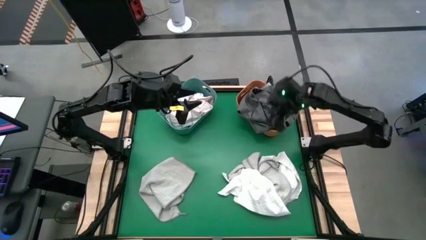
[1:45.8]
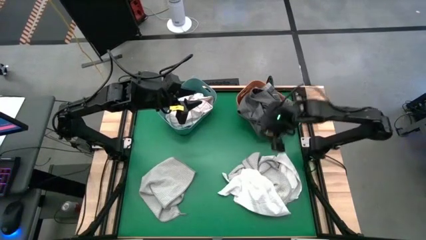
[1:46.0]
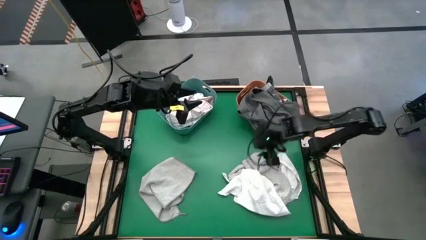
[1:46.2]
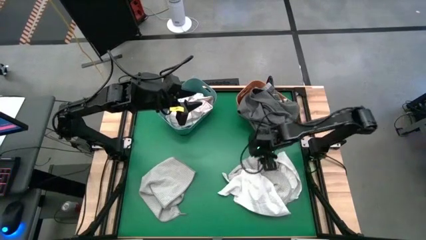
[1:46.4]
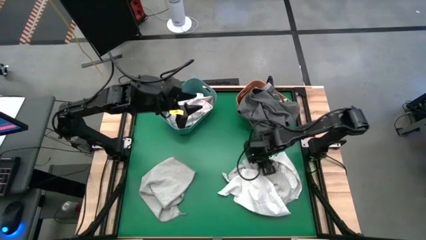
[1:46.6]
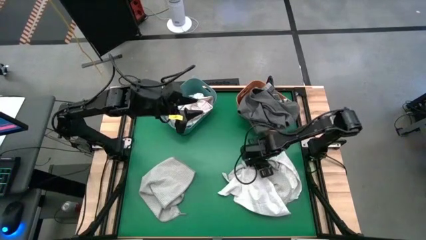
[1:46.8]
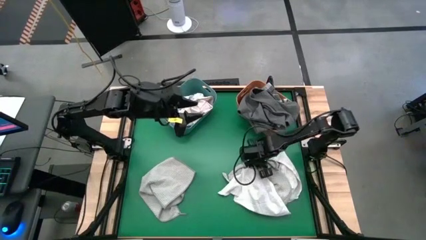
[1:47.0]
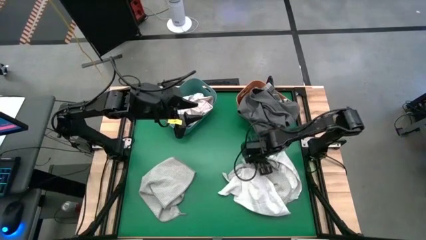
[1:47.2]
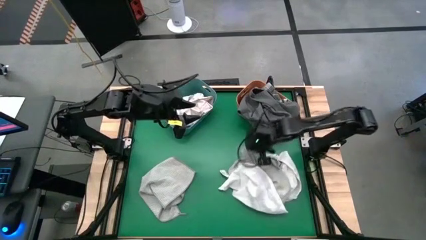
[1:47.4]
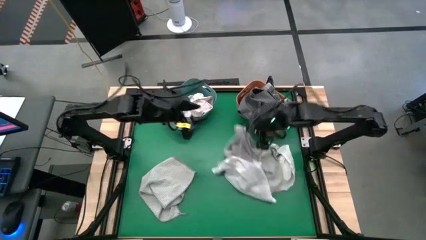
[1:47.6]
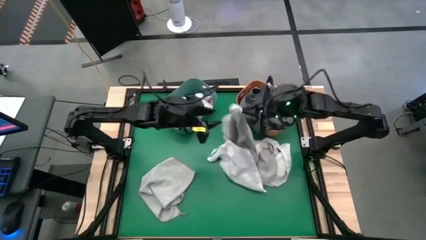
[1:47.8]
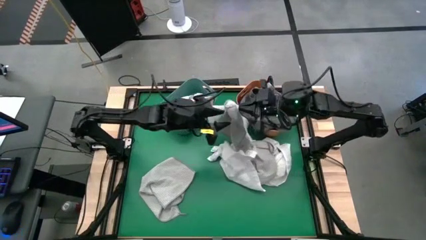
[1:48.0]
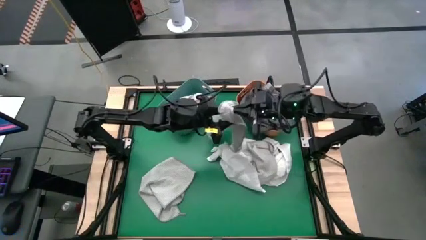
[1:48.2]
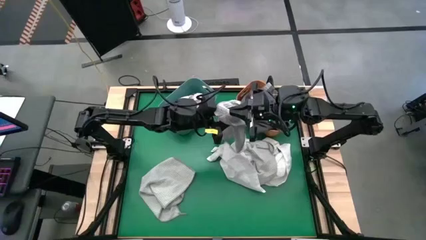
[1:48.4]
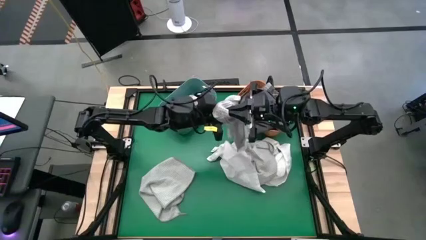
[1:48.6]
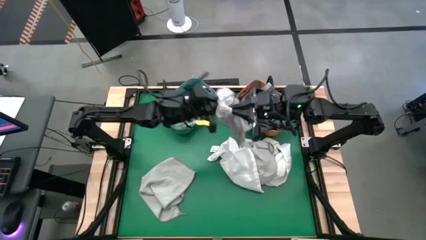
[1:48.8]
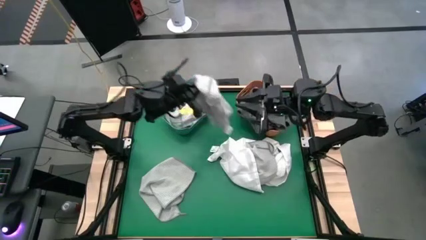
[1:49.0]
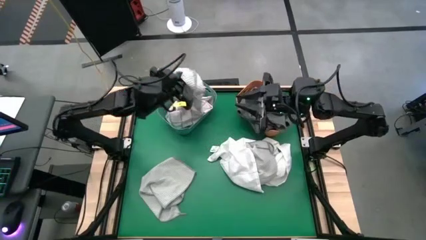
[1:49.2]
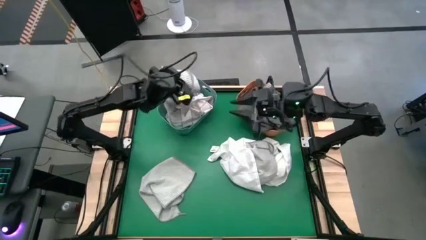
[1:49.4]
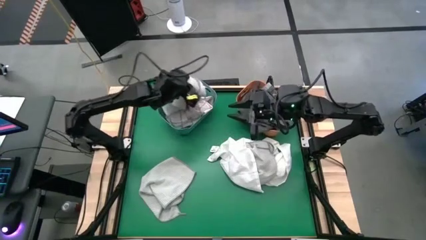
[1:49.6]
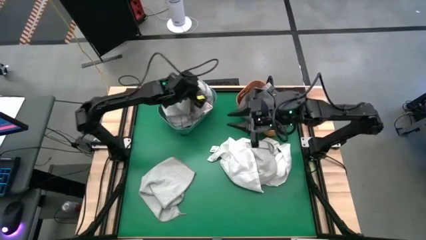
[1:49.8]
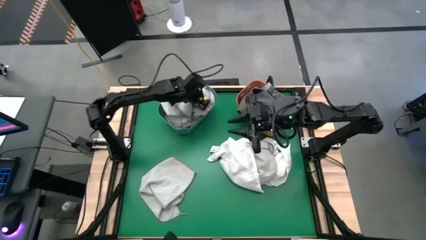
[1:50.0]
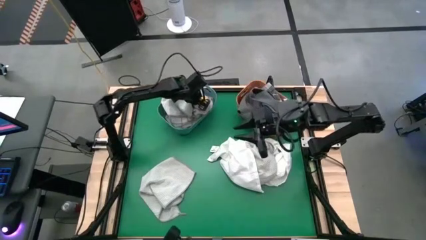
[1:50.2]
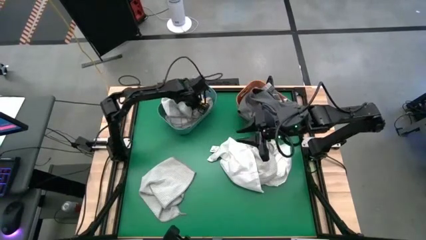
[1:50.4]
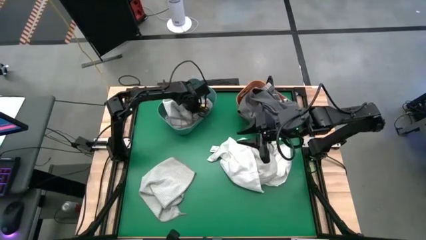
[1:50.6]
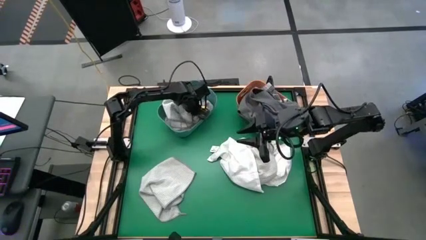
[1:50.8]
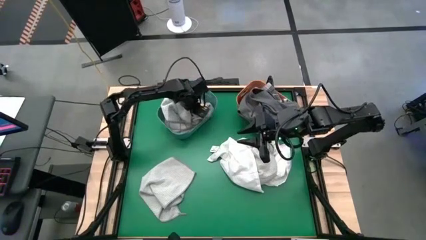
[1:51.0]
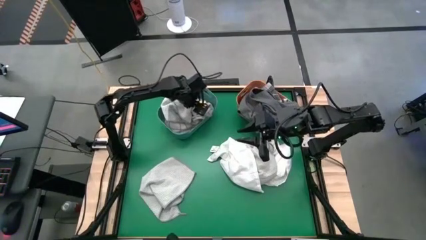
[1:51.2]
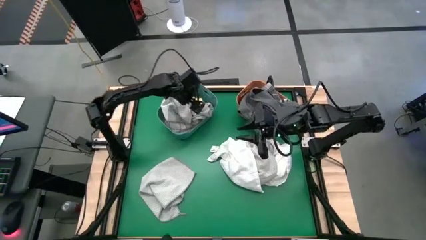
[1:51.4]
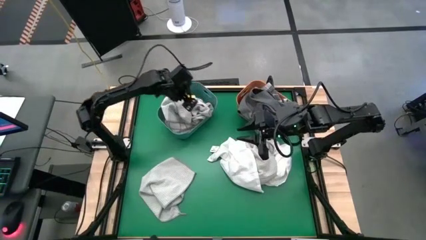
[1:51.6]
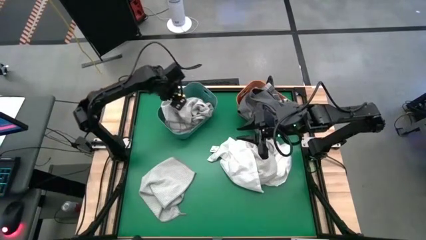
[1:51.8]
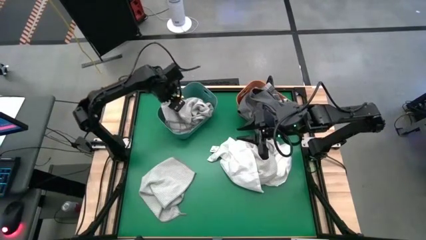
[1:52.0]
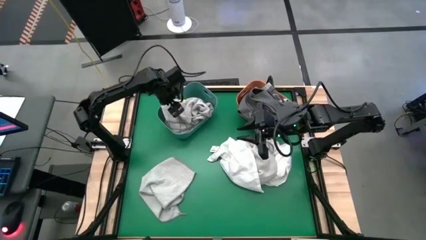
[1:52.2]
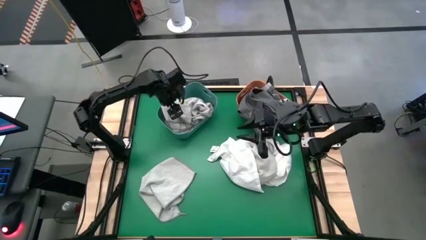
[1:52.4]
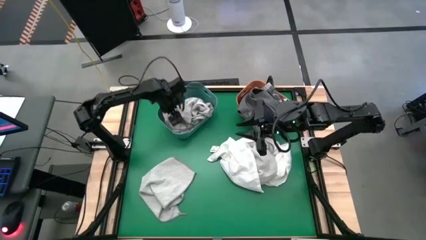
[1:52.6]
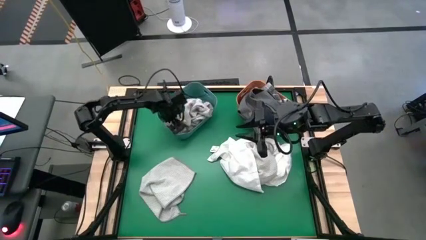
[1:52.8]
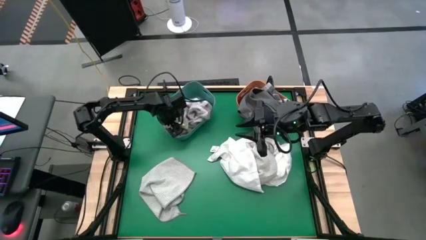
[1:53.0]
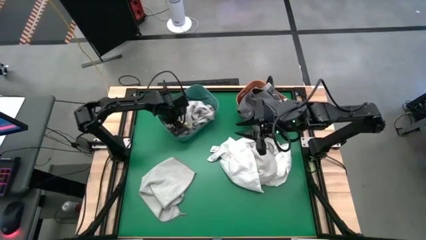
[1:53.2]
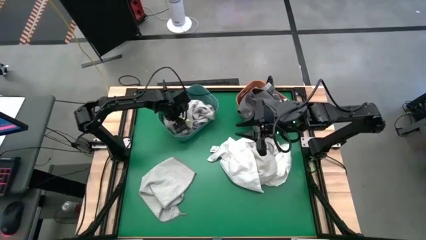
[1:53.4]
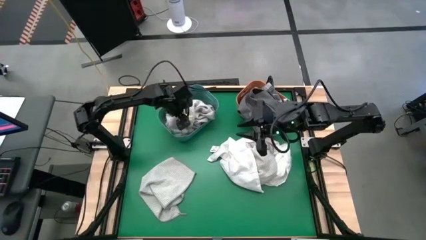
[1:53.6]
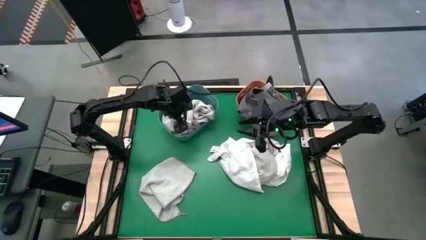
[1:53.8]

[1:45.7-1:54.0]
Task: Sort towels by color in basket
Put the gray towel into the blue bin

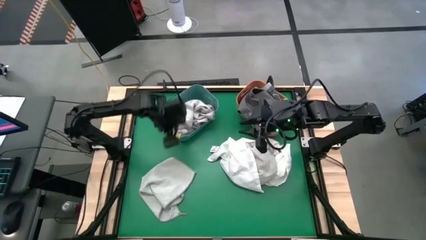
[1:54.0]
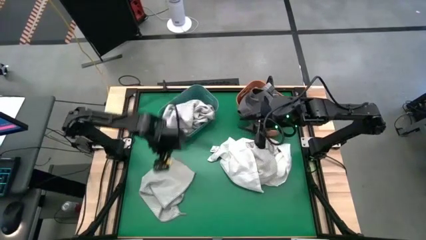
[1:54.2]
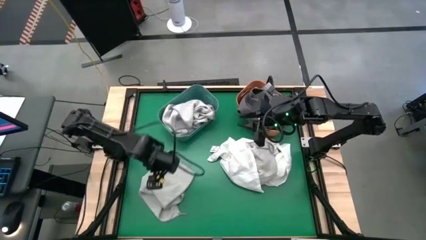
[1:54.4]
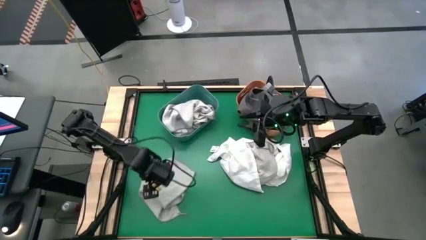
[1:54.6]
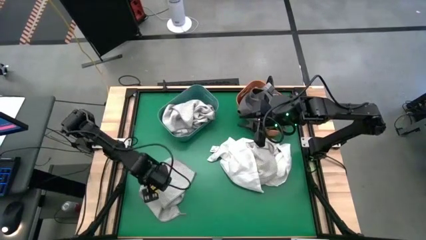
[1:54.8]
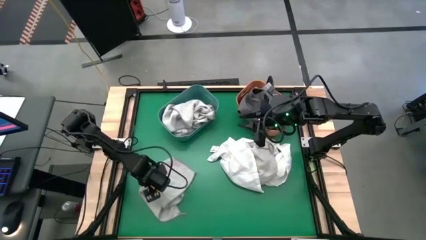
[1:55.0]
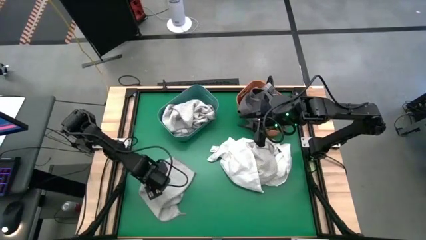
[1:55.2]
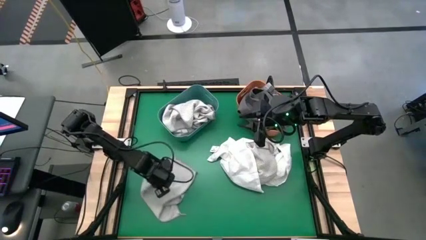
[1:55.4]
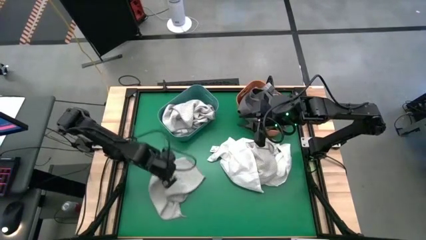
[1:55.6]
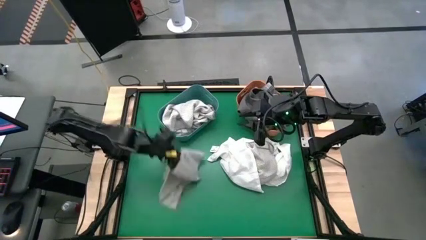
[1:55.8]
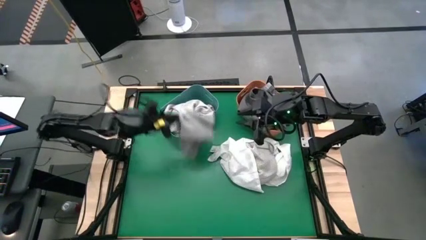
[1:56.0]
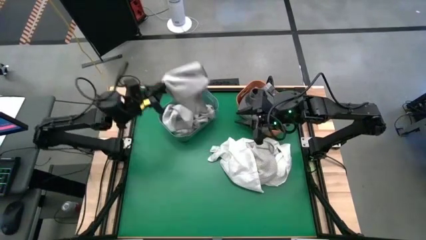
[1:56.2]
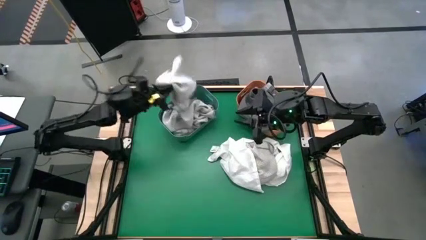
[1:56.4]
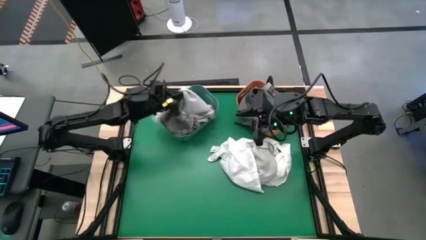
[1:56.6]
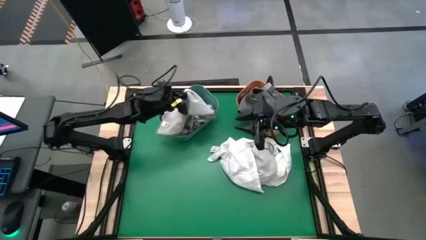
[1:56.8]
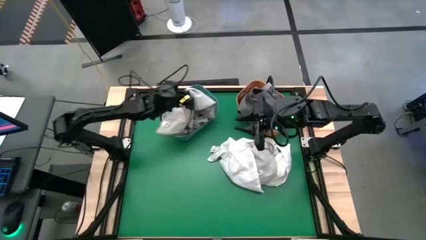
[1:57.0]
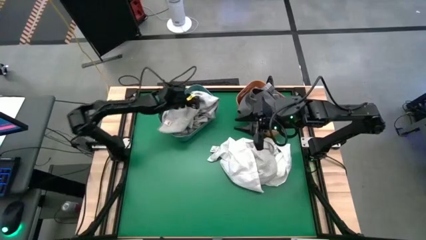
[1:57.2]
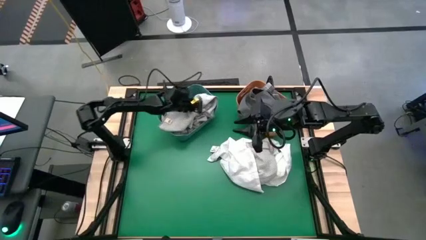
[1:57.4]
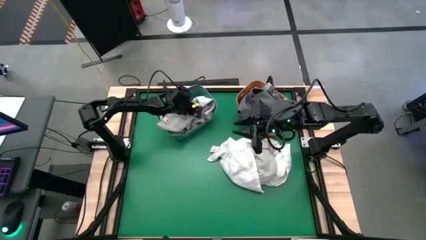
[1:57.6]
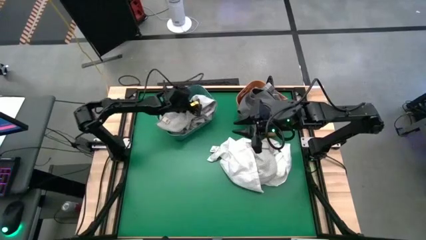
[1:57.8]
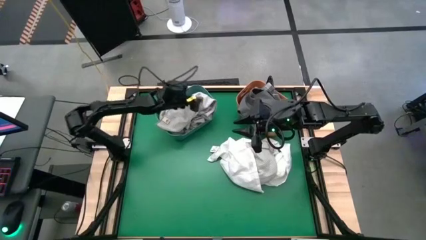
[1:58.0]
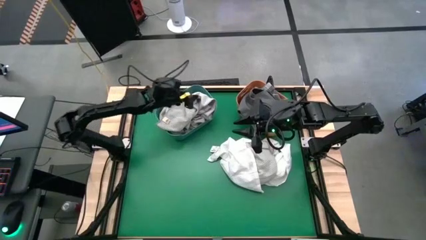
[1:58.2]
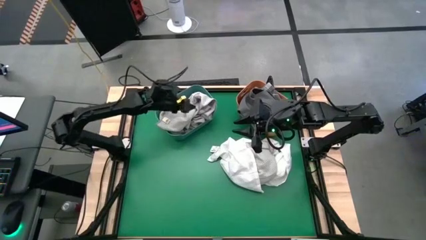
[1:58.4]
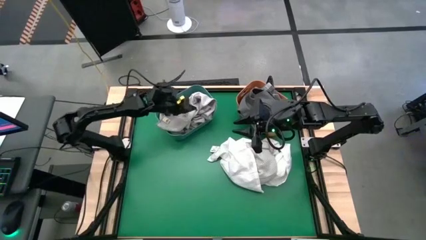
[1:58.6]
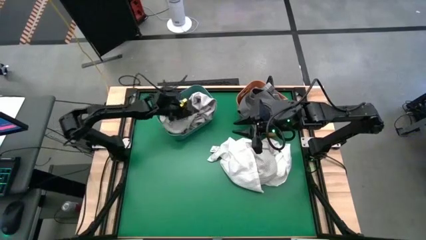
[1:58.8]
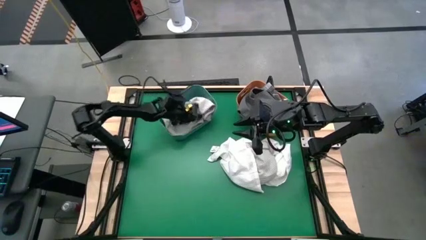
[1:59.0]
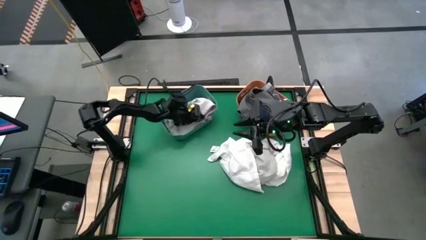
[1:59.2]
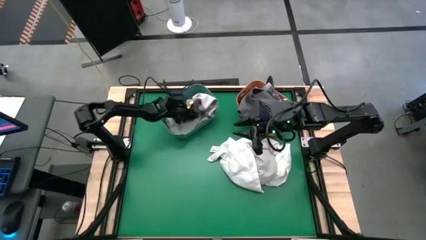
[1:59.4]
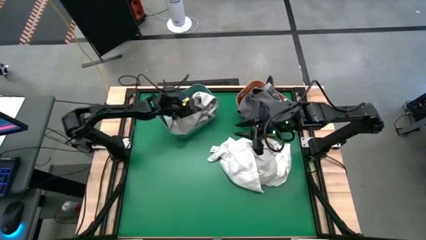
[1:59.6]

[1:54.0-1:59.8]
Put the gray towel into the blue bin

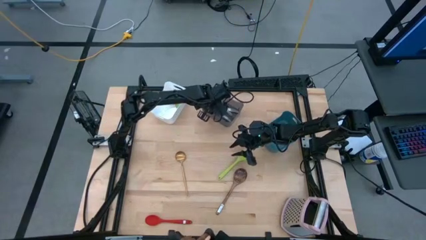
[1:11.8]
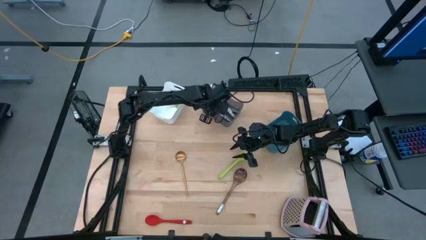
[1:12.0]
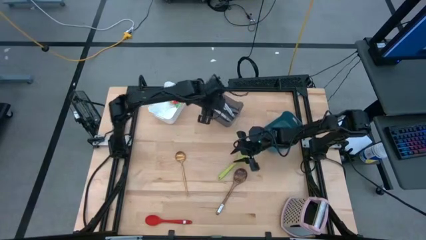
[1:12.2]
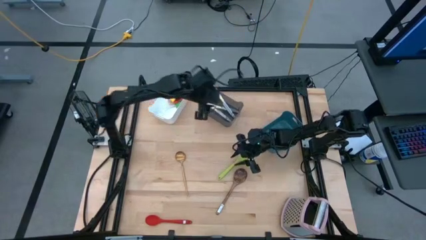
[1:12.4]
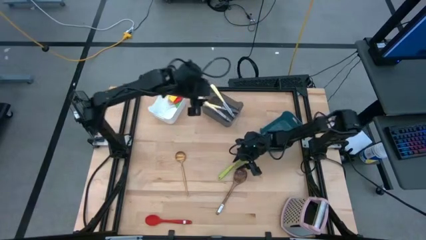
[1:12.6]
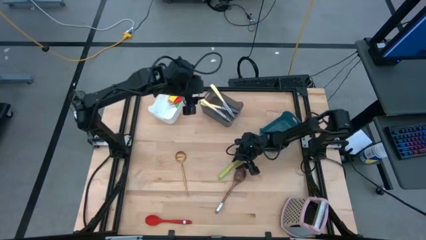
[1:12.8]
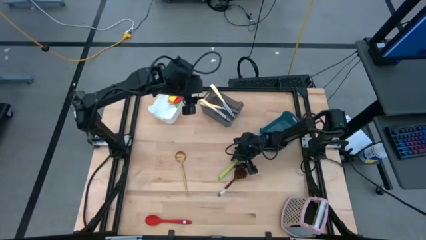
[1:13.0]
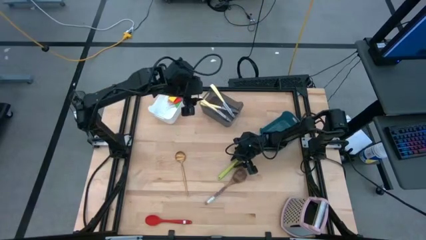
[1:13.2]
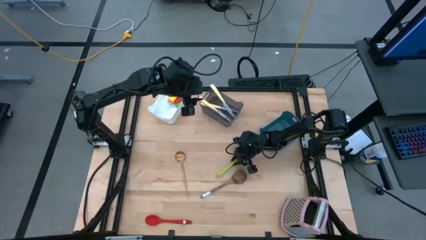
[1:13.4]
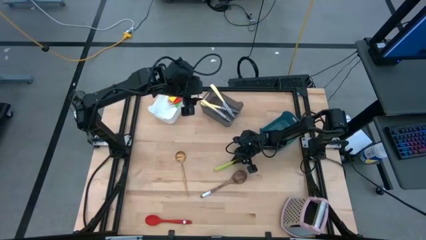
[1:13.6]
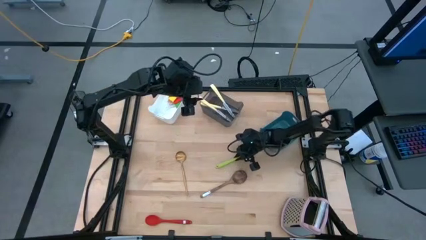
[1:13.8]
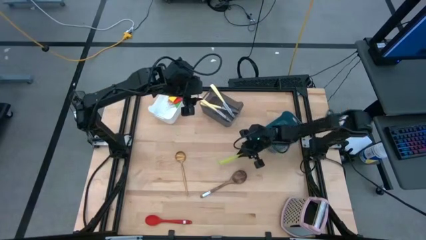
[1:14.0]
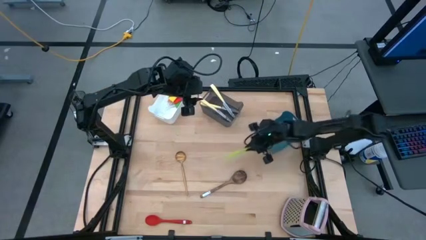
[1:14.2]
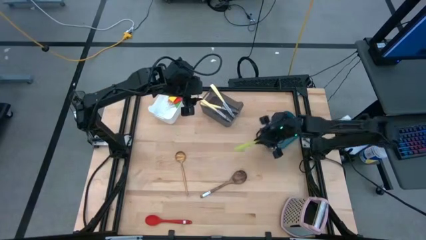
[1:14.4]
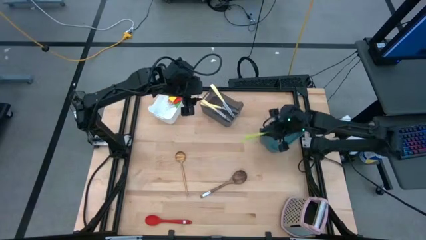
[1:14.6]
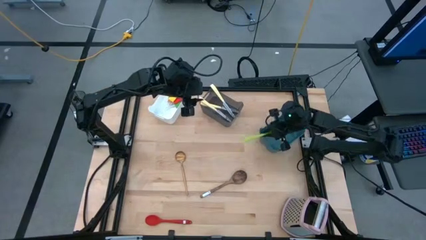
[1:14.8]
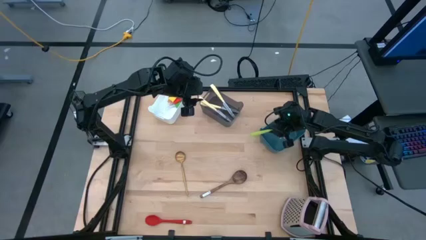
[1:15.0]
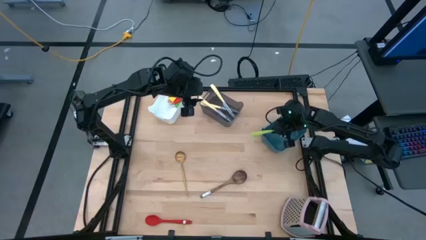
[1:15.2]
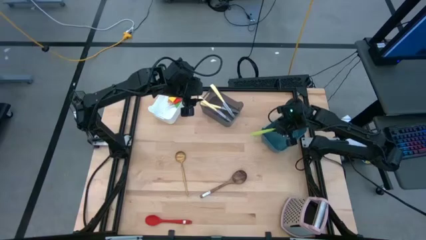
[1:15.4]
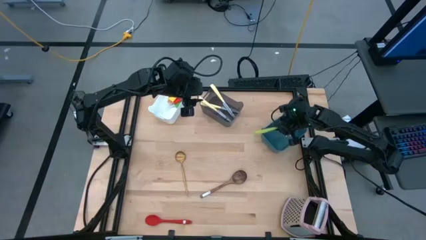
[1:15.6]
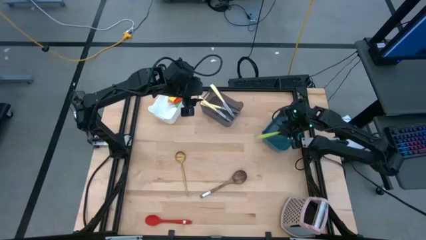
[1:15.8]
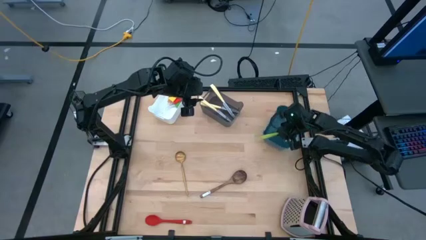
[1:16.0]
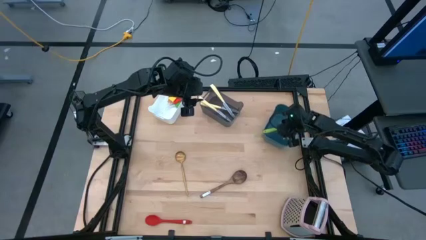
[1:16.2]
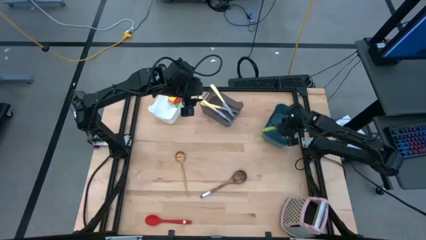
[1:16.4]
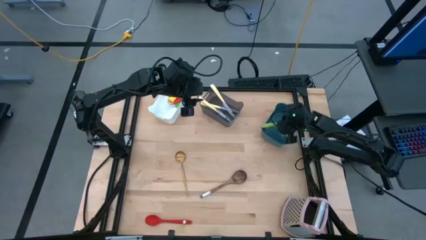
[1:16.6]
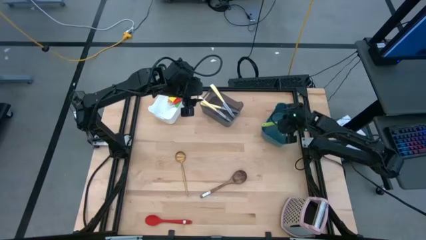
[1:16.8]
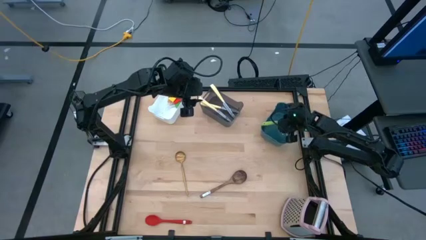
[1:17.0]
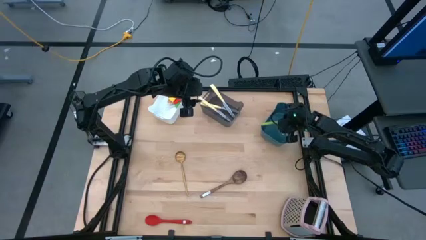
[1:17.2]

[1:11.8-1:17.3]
Task: Pick & Place Kitchen Items
Put the green serving spoon into the blue bin
